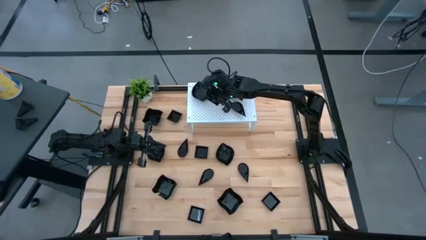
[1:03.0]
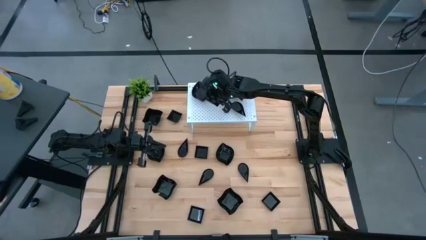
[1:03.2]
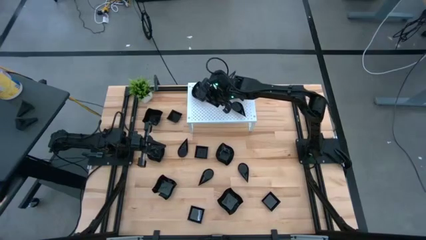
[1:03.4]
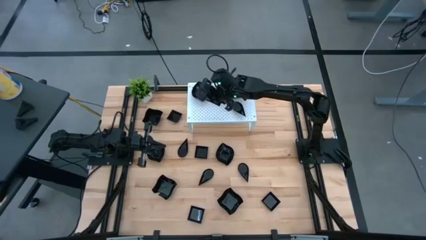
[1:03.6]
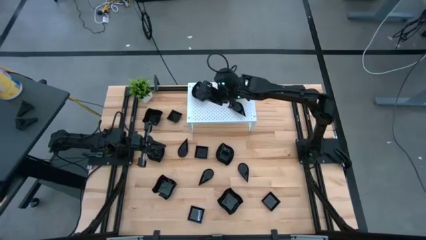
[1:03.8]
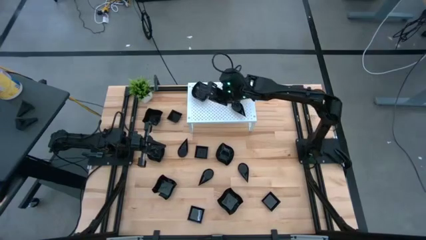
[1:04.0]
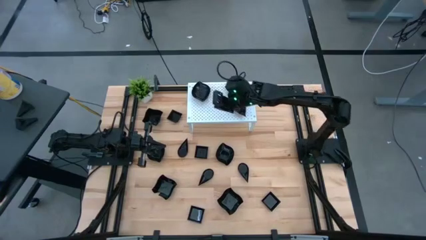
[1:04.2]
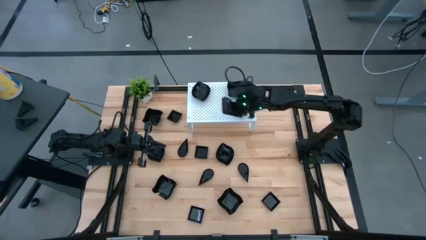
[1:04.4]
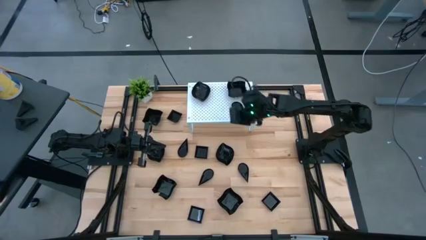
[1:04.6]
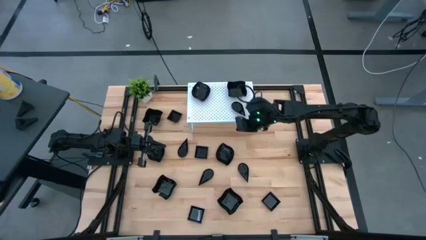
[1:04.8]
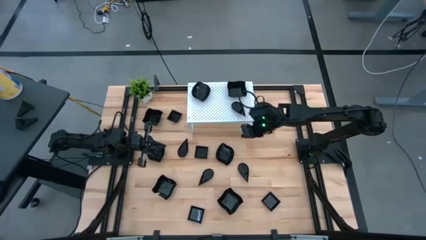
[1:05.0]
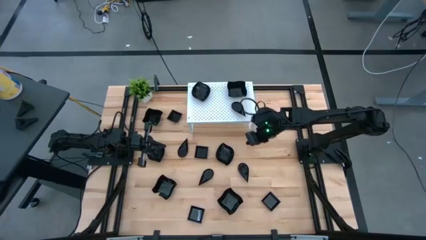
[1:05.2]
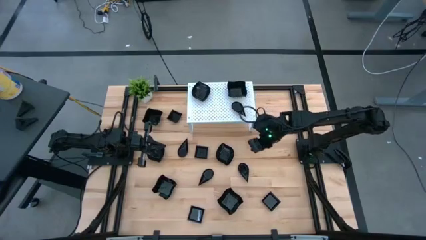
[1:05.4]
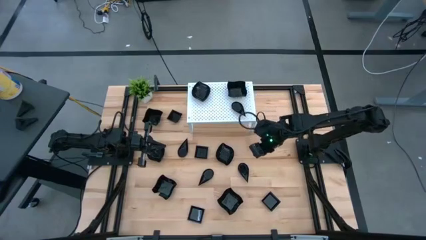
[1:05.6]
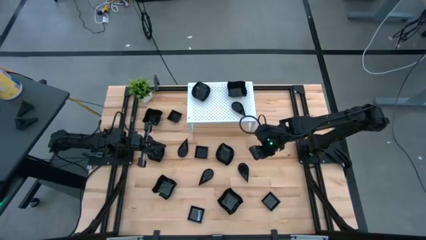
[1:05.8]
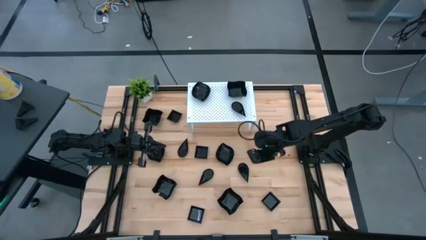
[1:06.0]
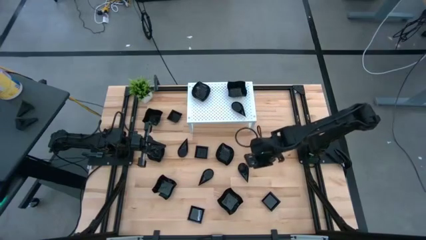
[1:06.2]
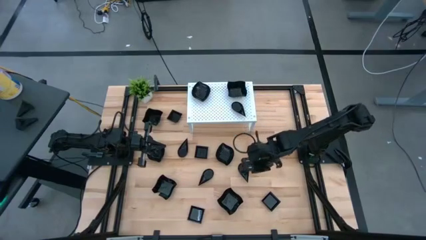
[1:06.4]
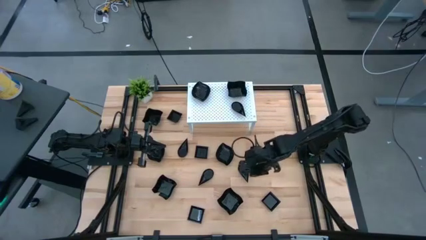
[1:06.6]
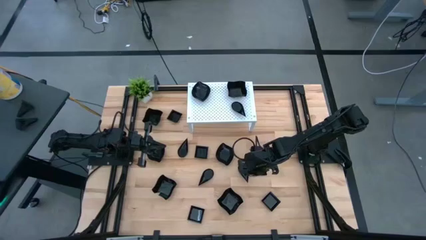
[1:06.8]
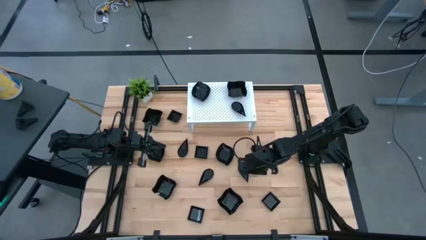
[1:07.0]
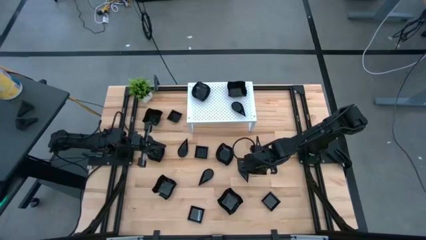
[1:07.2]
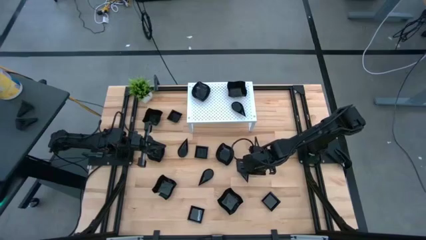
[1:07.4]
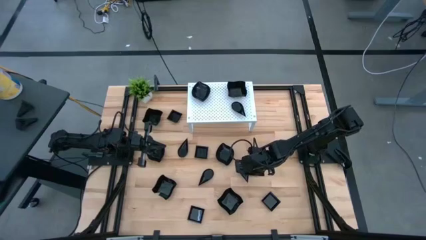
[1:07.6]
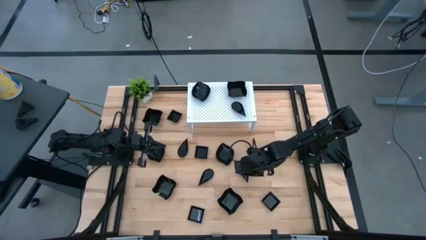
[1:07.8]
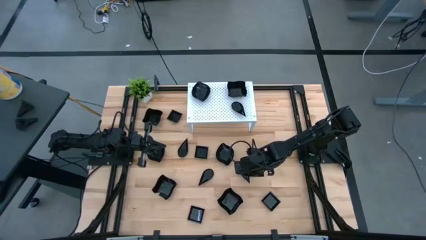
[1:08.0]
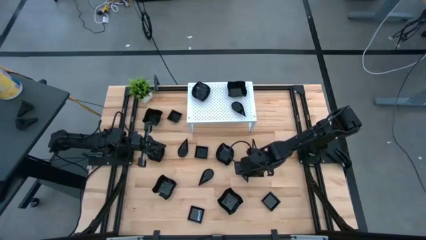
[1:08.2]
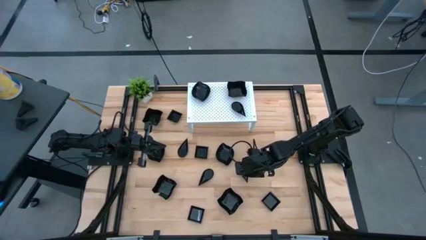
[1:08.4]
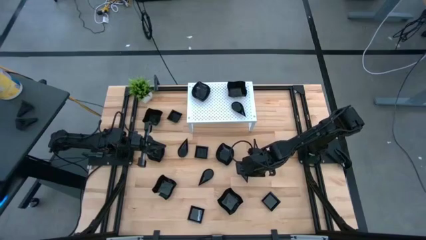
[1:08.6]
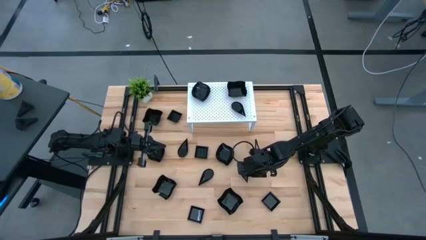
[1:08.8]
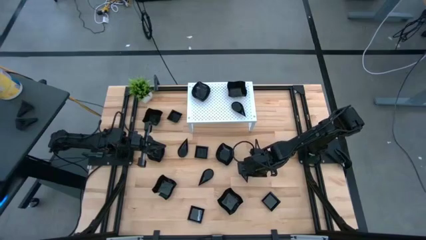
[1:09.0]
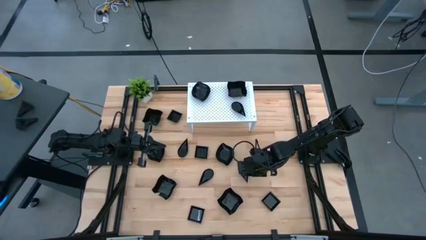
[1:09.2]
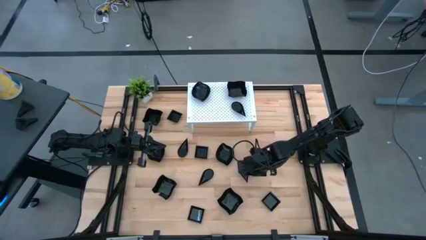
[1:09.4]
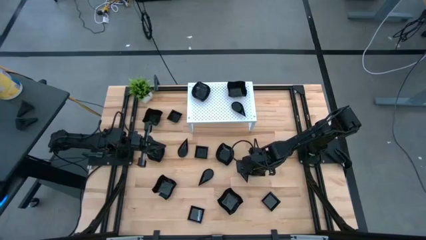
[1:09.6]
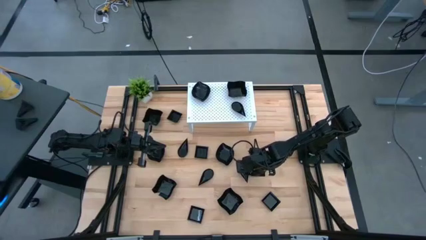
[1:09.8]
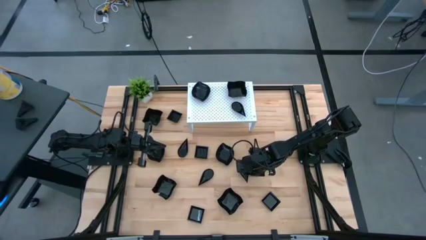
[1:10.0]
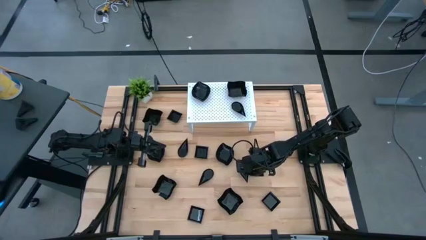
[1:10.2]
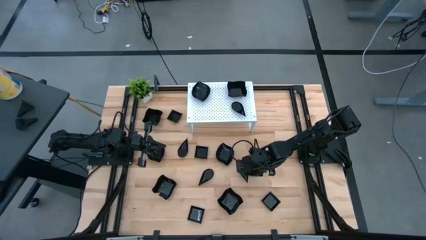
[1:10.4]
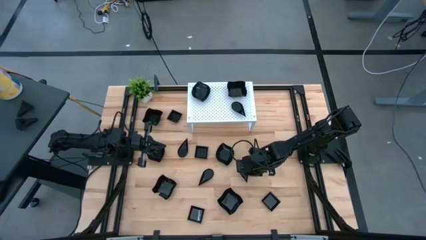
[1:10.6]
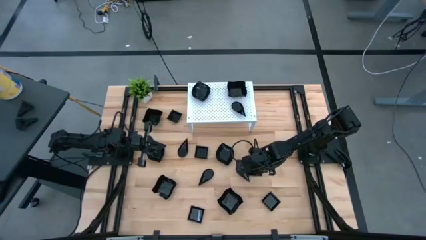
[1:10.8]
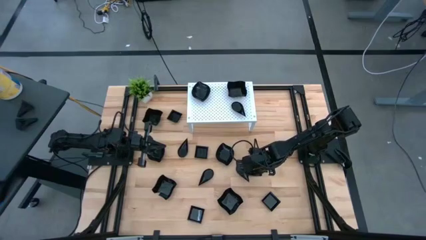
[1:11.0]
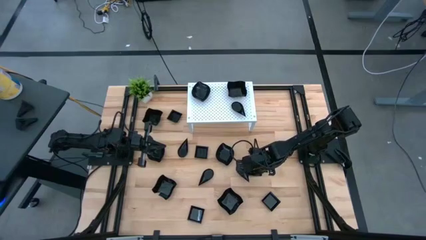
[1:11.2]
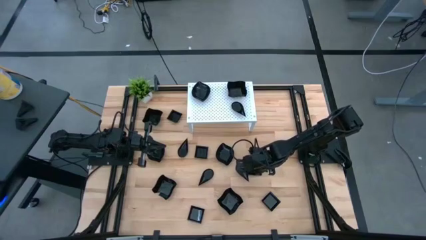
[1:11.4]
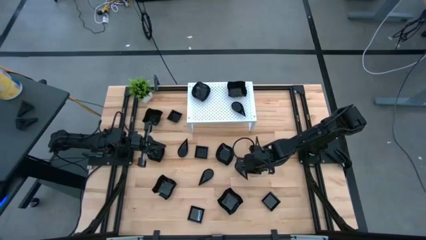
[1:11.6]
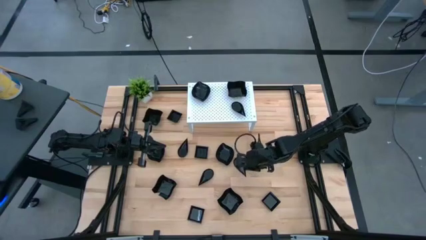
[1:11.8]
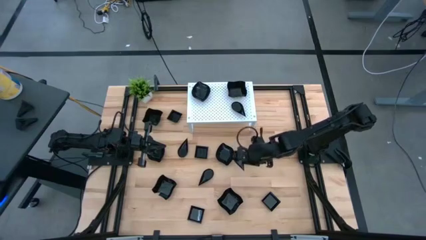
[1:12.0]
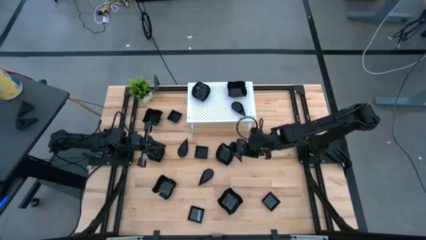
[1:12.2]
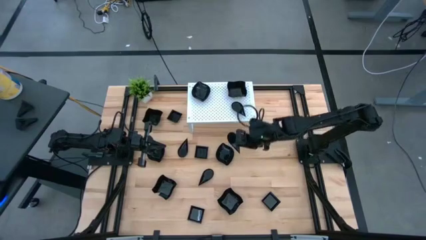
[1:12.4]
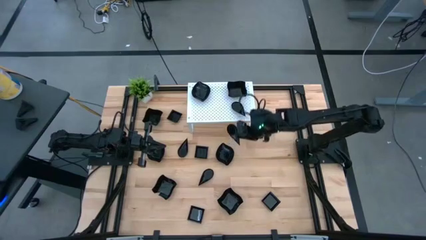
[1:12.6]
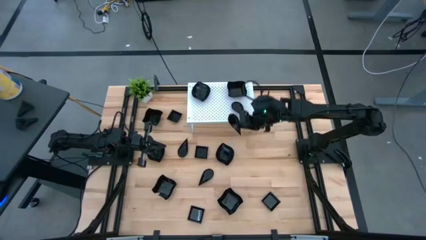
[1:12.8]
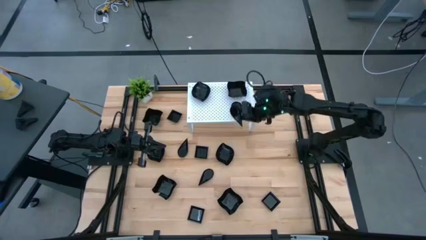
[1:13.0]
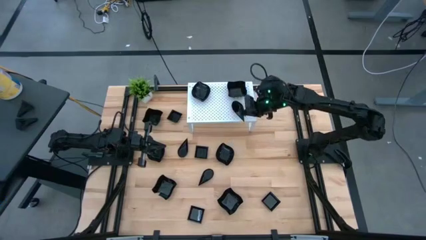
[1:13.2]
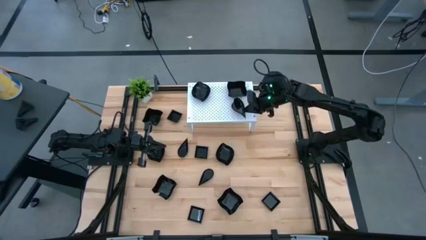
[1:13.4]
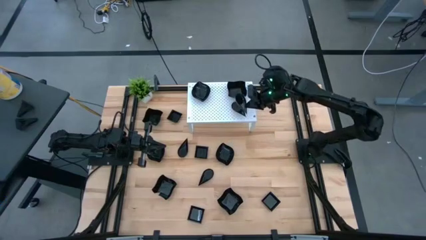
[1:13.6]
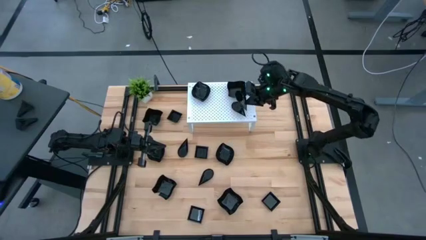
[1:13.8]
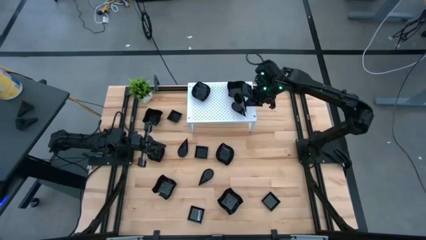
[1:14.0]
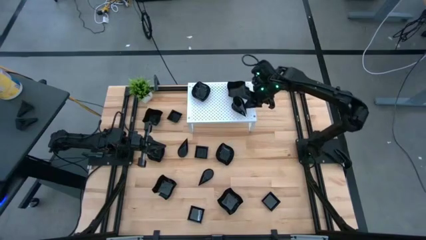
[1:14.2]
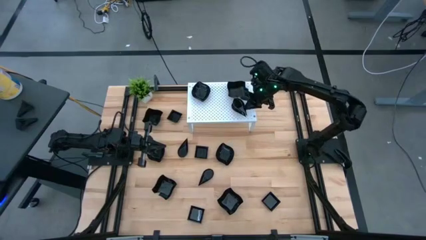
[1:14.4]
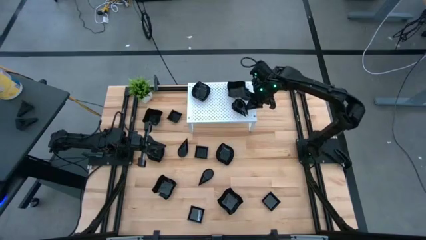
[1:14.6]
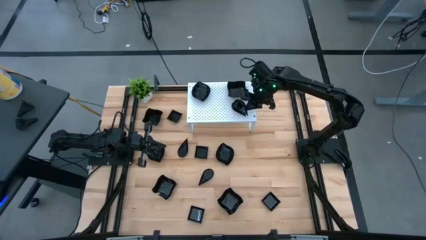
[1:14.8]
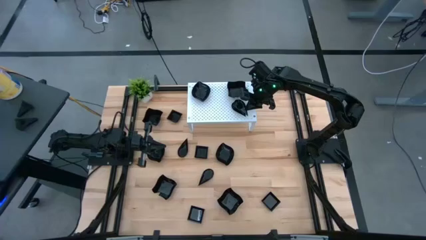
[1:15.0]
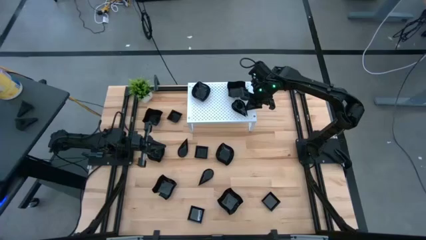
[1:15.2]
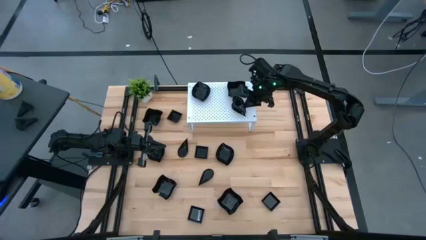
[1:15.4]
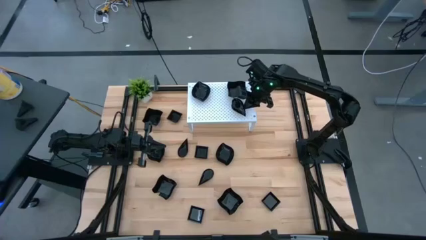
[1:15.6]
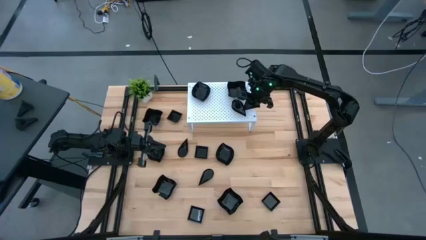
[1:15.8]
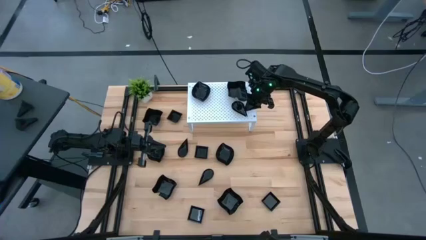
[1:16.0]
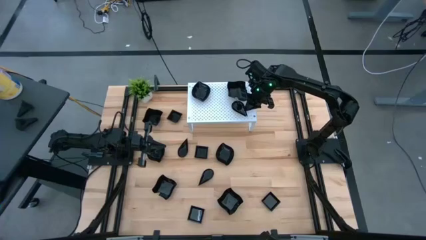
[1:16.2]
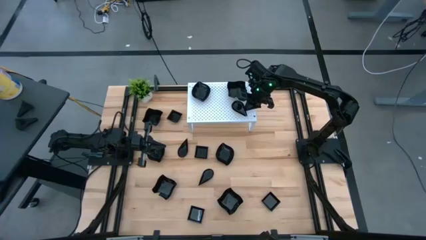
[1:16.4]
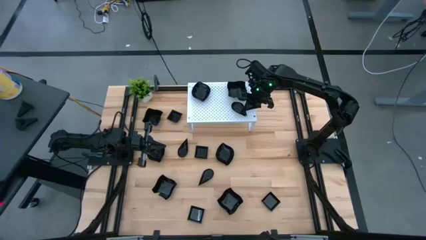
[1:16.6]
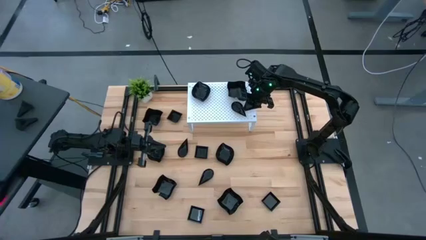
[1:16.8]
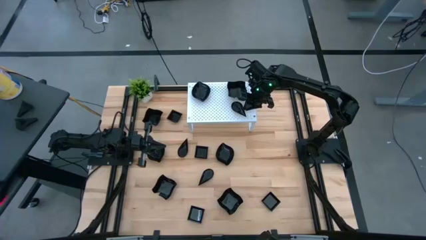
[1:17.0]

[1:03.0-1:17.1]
Task: Pick & Place Mini shaped plates
Stack the drop-shaped plate on top of the drop-shaped plate on the shelf
